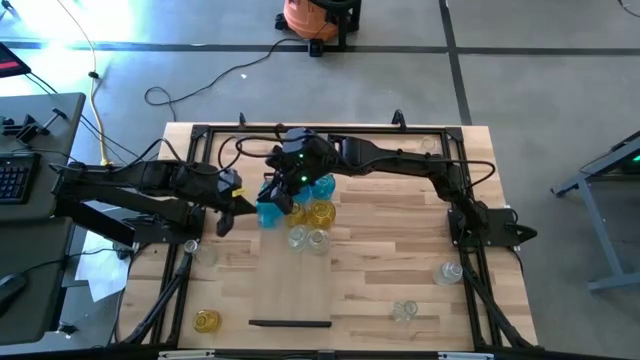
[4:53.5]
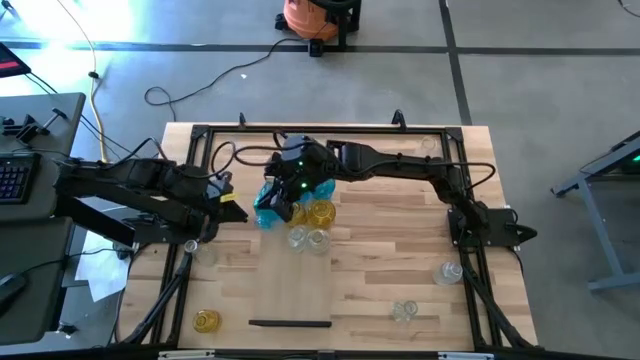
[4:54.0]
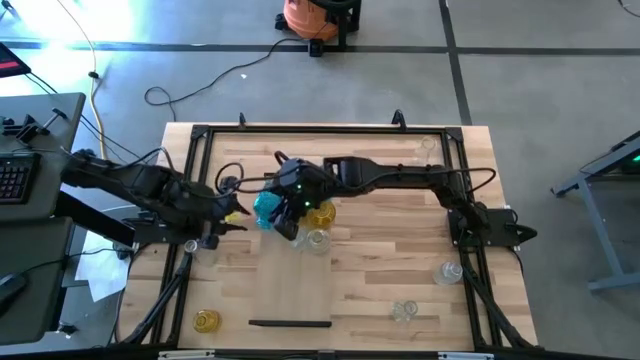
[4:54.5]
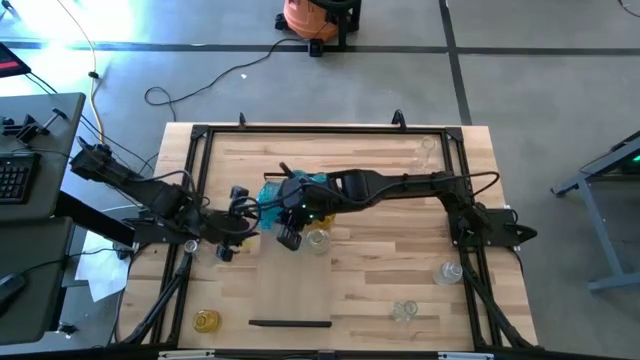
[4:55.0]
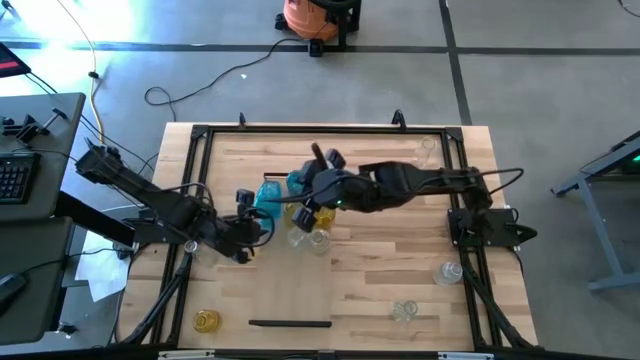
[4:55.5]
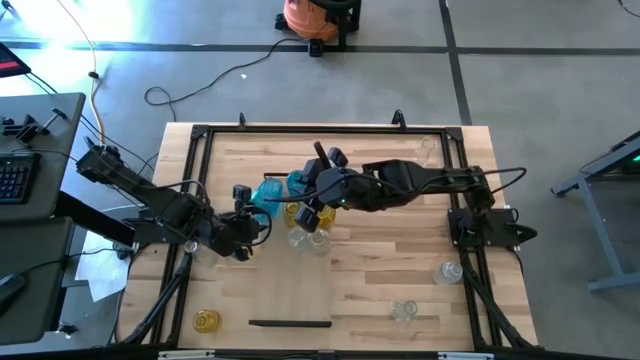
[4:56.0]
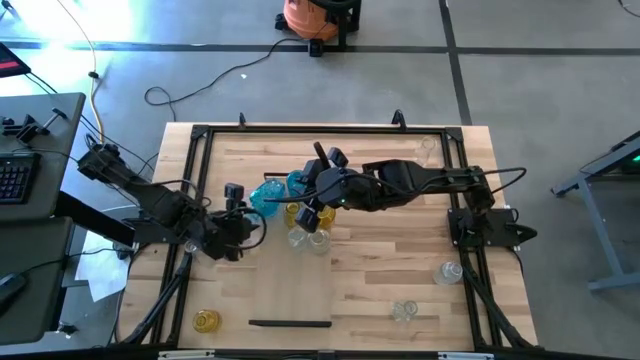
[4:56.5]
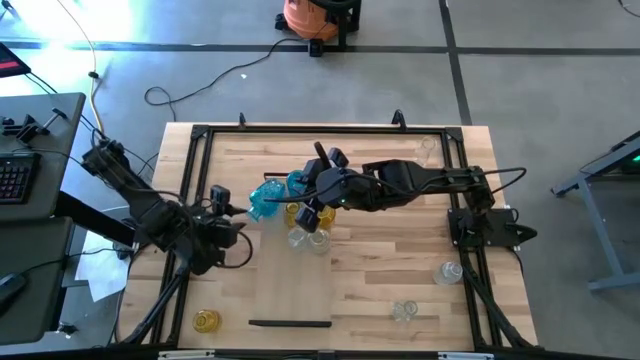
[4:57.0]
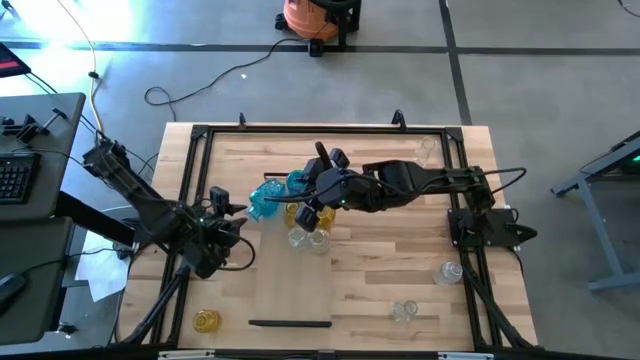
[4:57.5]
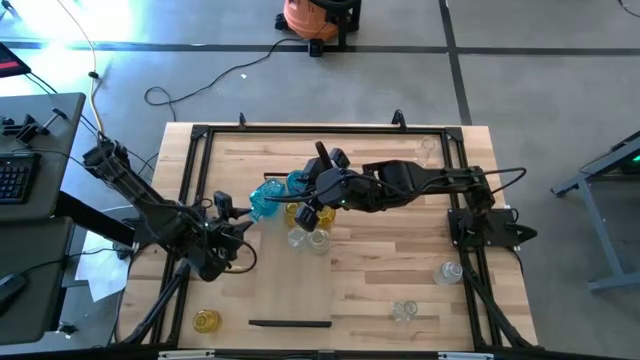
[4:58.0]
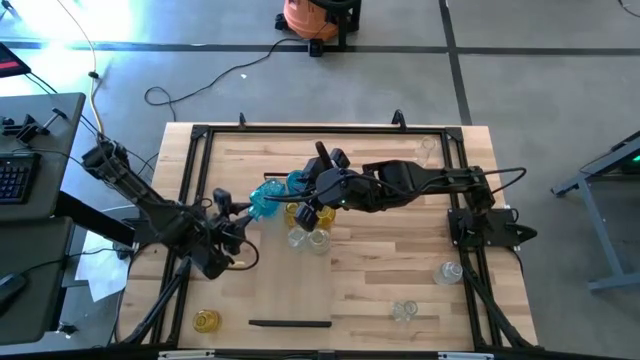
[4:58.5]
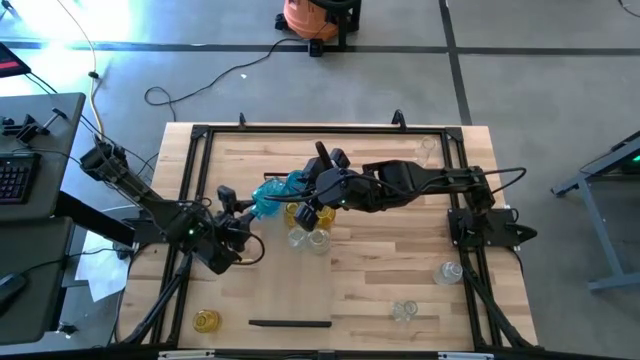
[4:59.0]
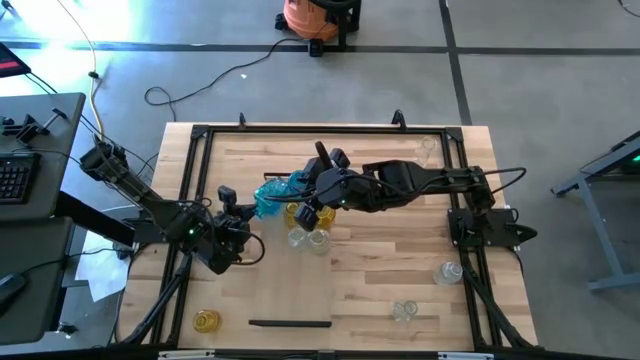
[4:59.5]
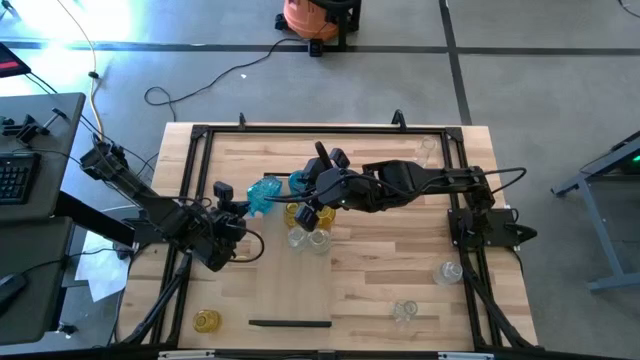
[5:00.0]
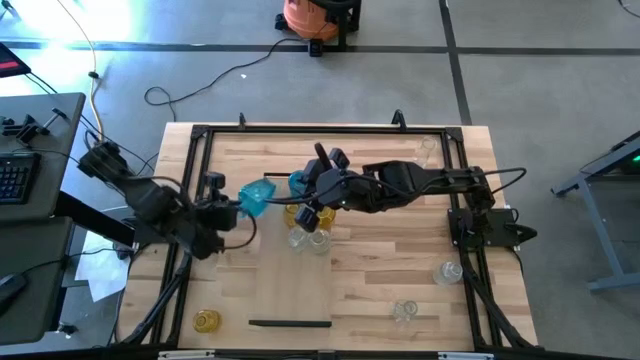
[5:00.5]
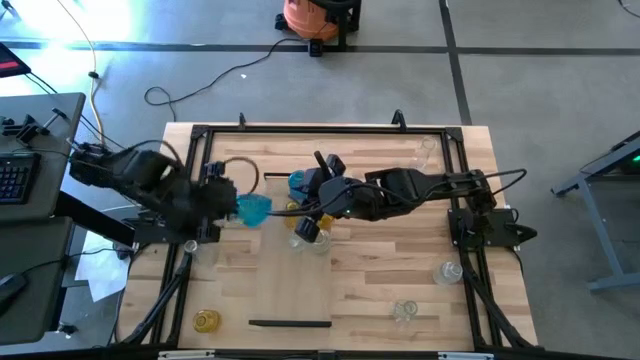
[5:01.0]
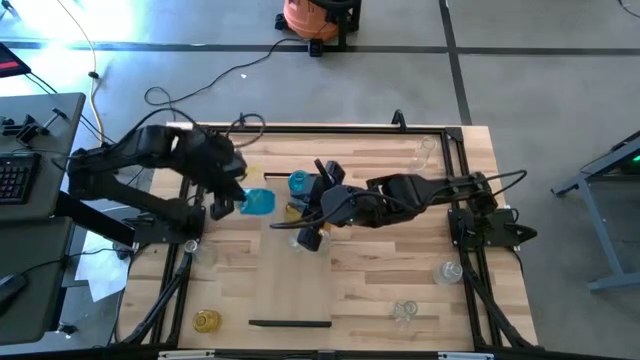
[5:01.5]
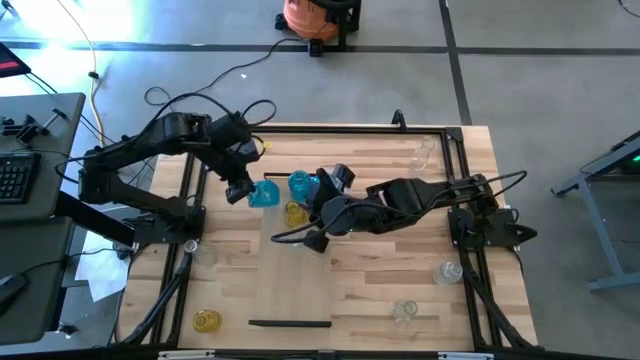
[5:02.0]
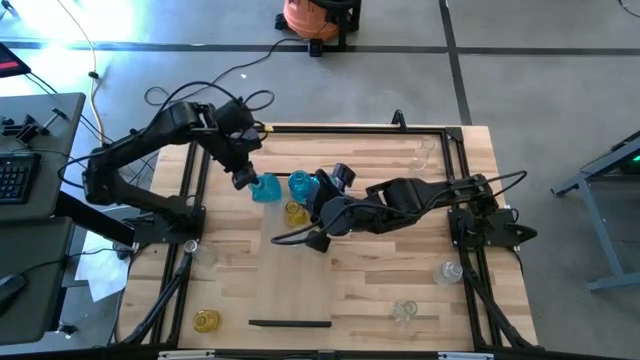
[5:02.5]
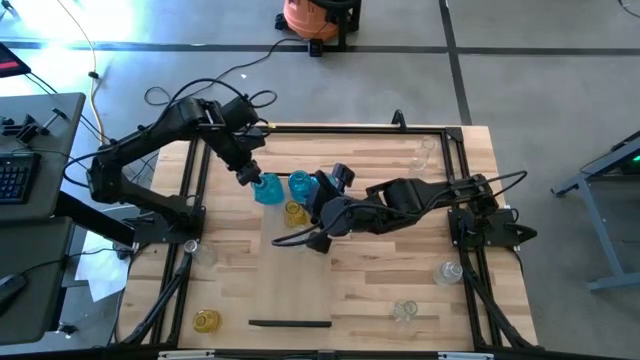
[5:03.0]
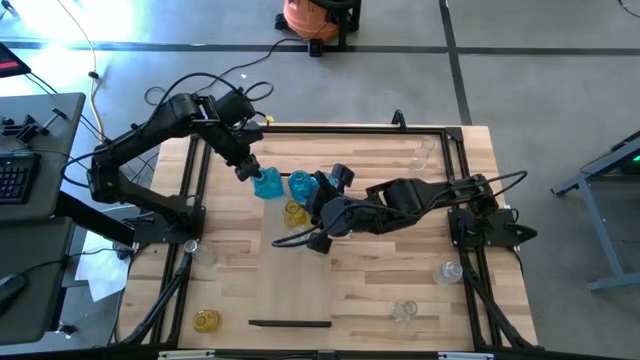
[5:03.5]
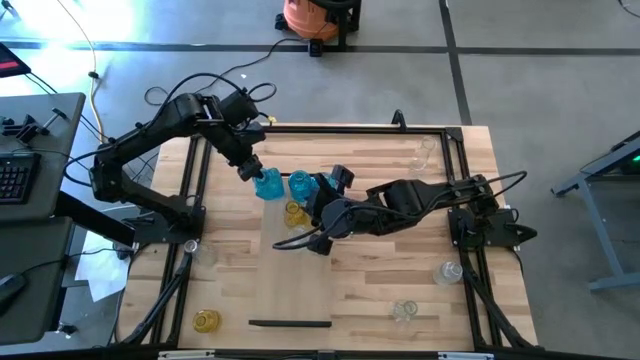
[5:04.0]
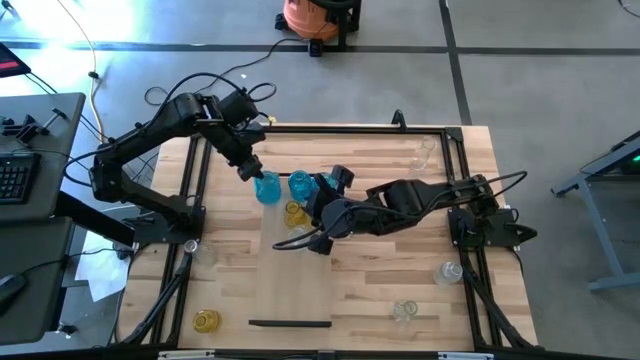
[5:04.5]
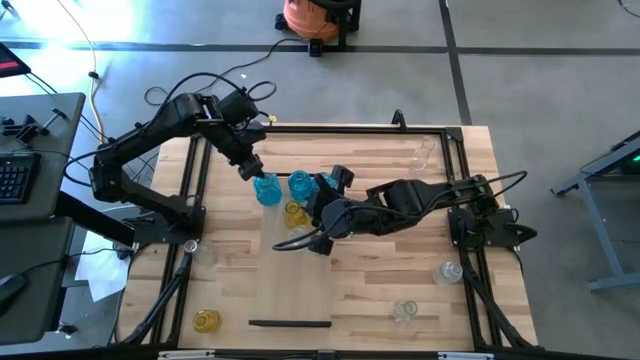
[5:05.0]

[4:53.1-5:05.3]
Task: sort vases onto shelf
Put the blue vase on the shelf to align with the other blue vases

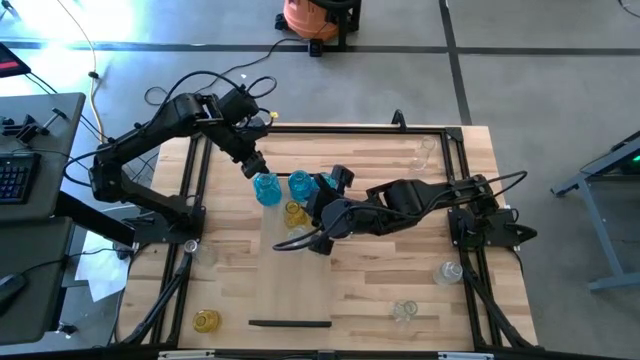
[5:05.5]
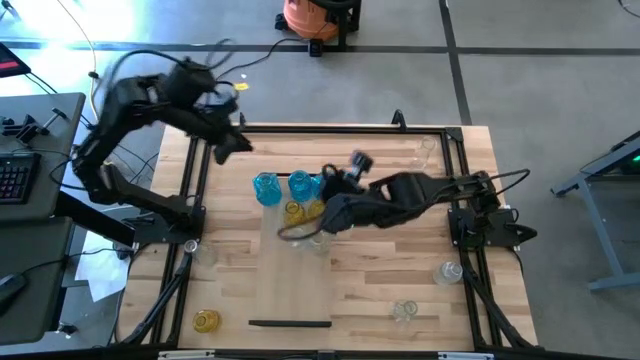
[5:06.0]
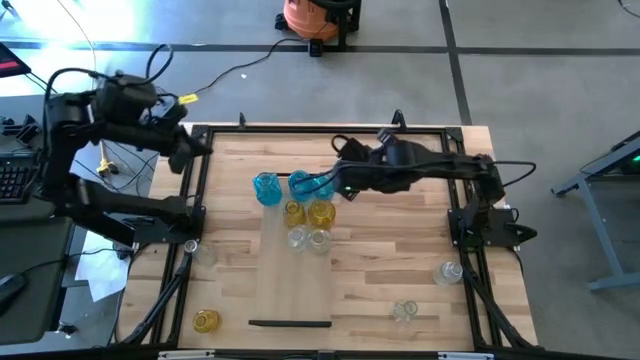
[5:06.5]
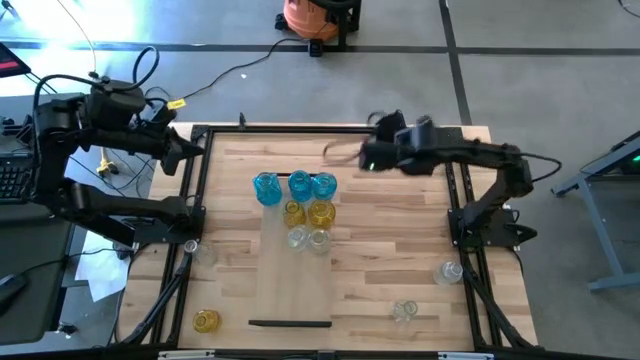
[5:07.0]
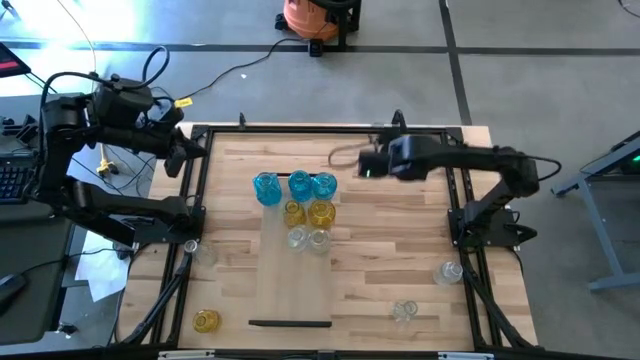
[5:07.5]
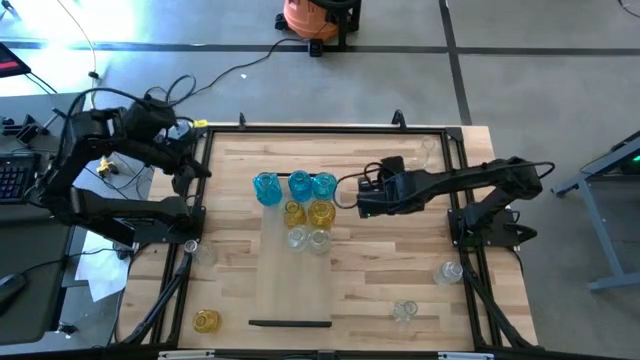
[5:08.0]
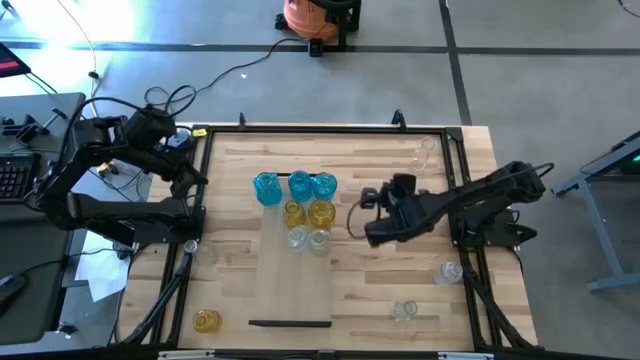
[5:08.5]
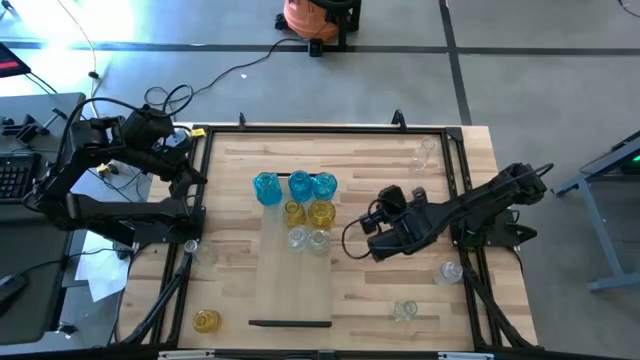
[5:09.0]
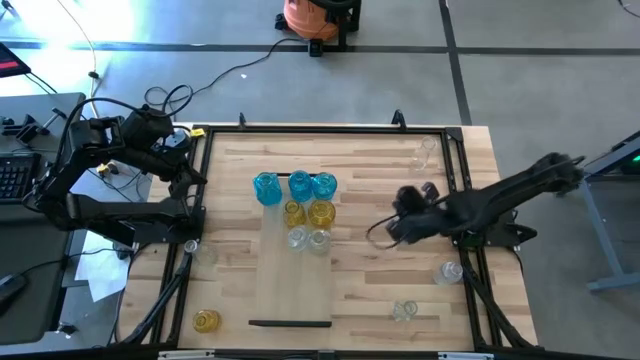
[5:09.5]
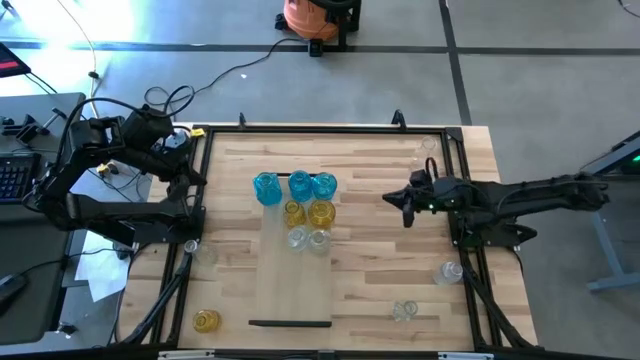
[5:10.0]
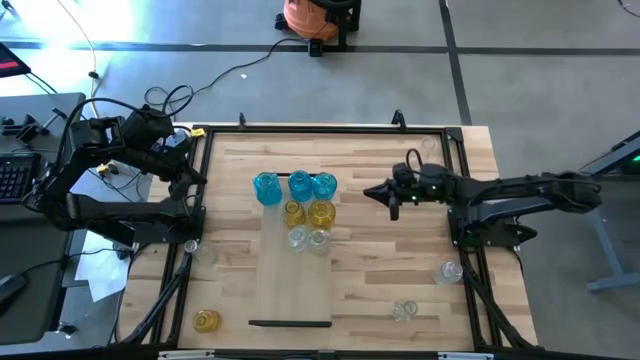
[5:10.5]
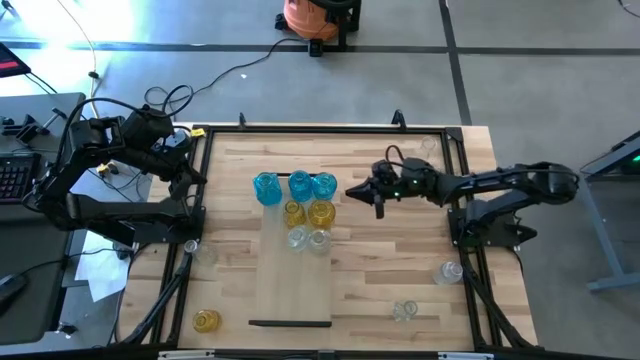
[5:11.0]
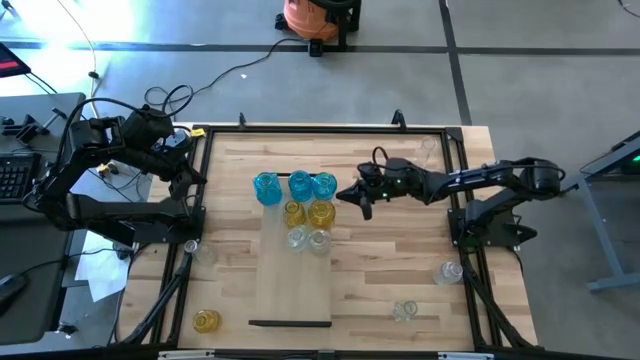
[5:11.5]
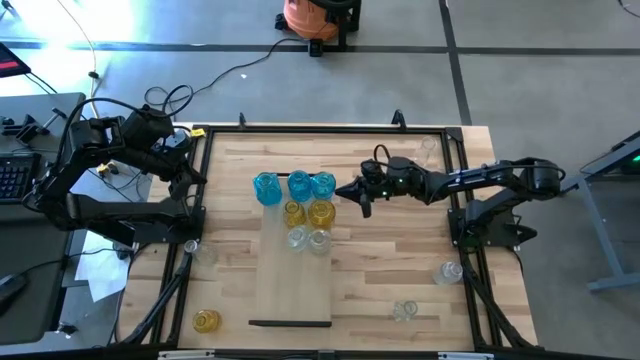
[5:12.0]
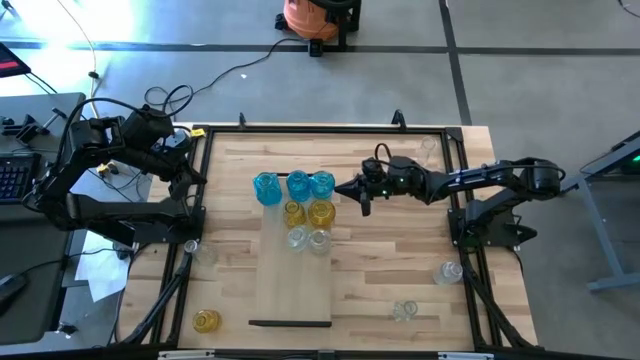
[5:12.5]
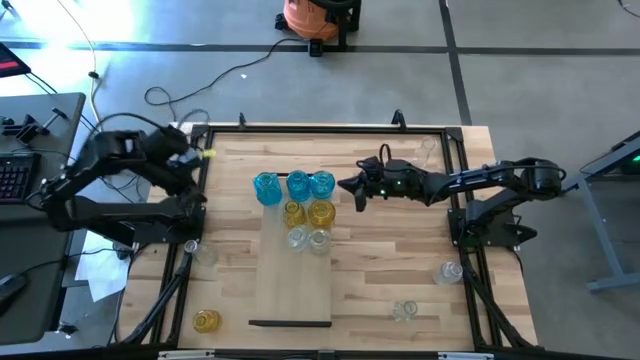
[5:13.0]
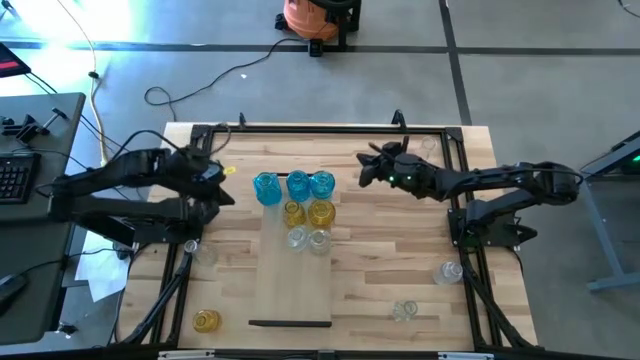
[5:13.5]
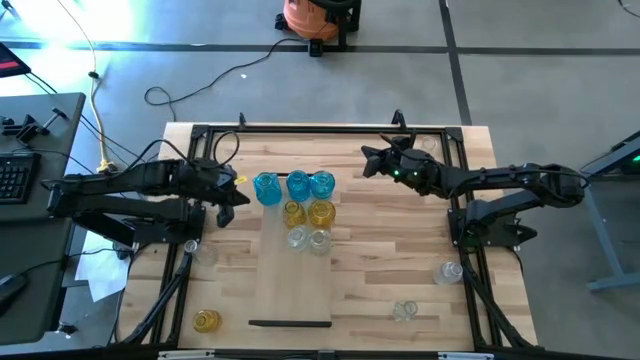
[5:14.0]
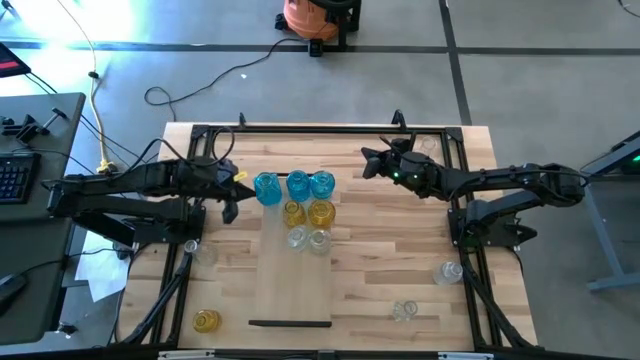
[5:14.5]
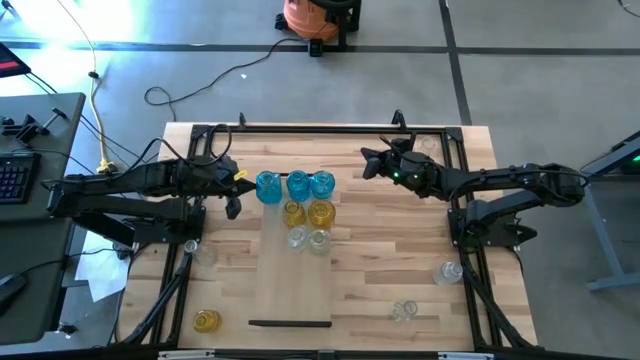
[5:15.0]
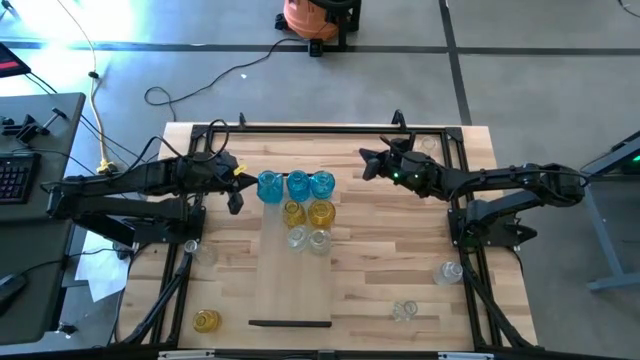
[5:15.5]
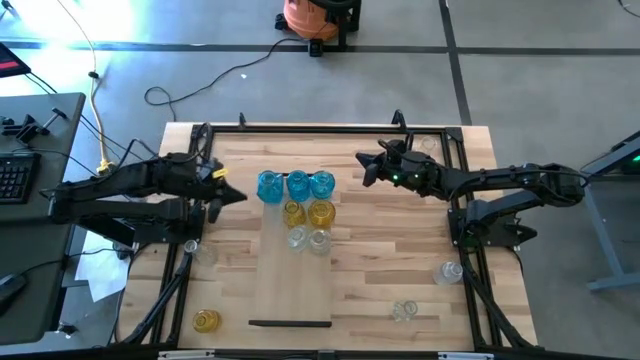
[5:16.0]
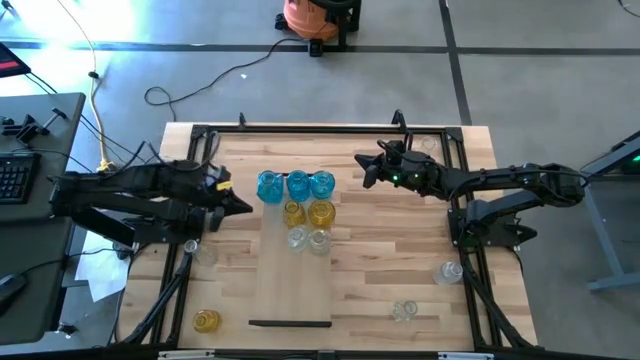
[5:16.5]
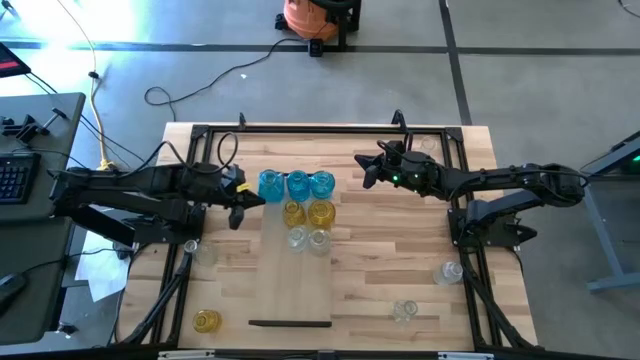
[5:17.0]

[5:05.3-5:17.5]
Put the blue vase on the shelf to align with the other blue vases
